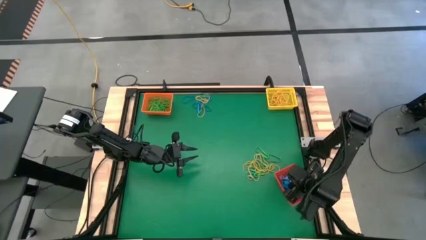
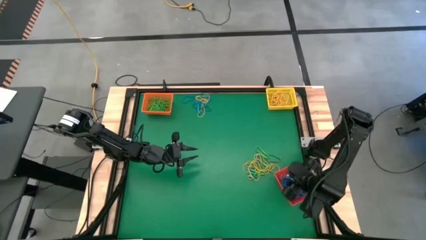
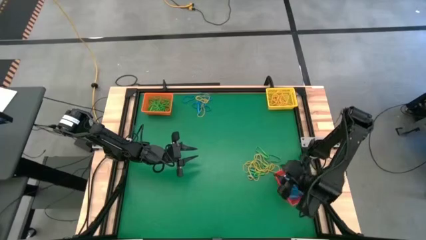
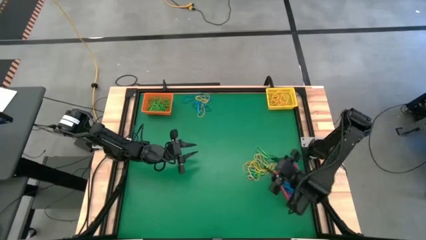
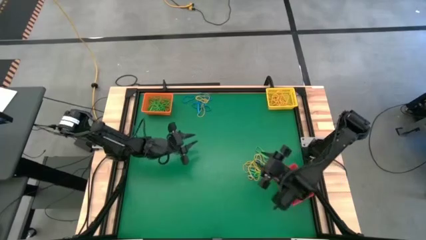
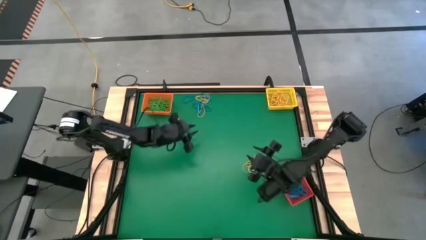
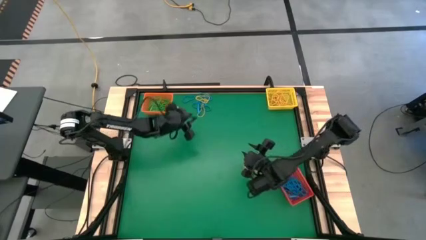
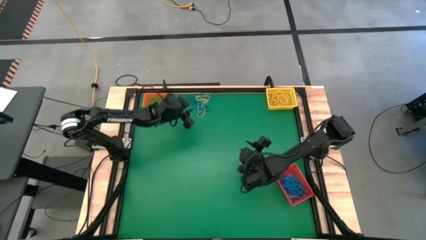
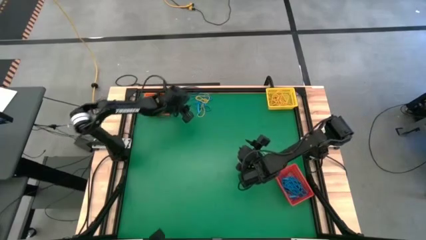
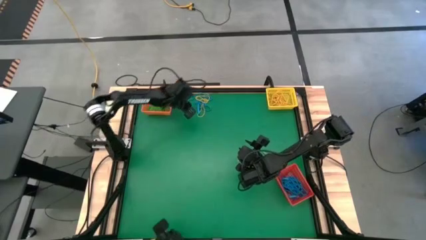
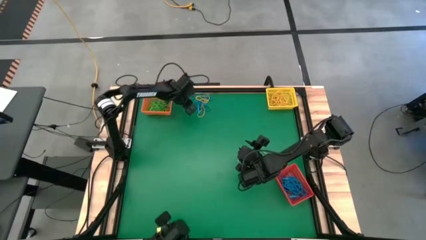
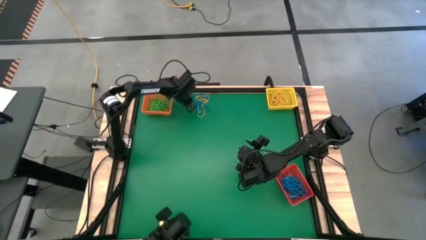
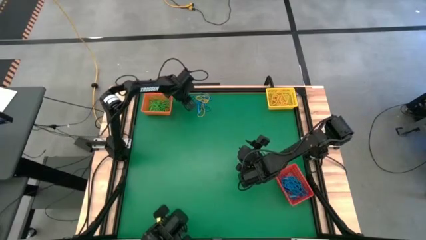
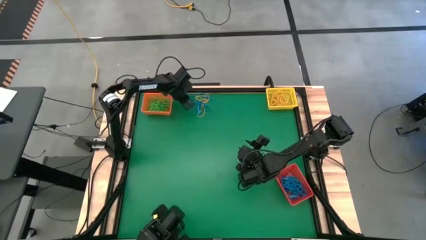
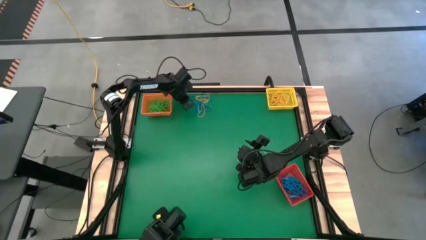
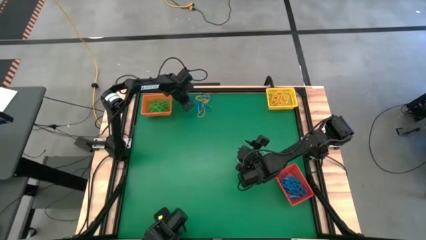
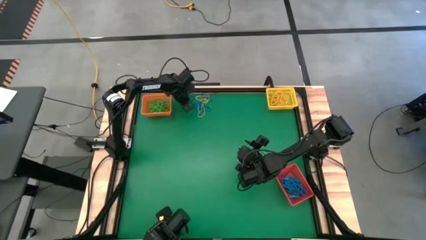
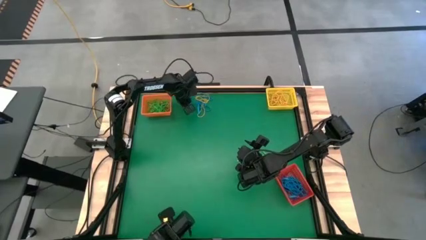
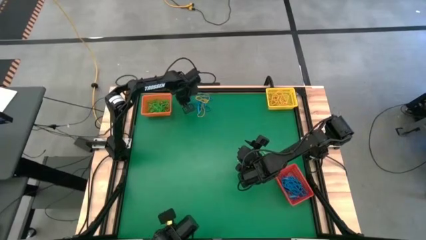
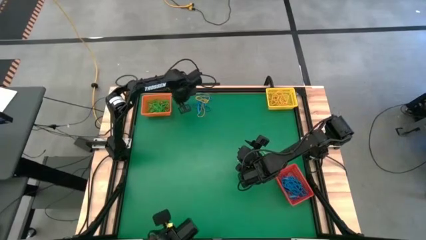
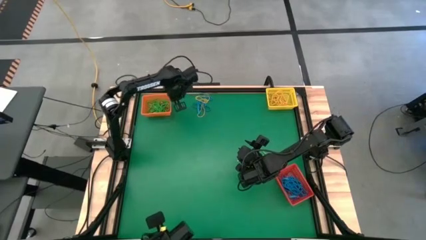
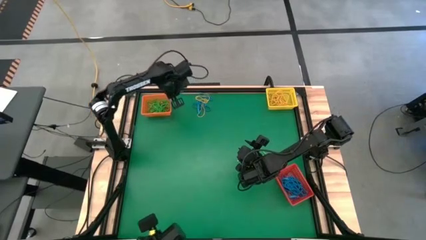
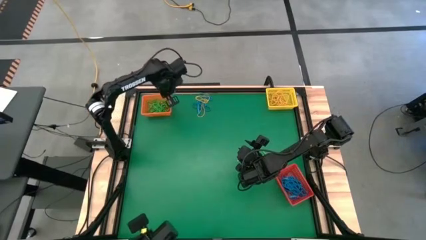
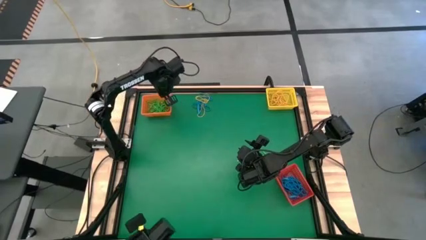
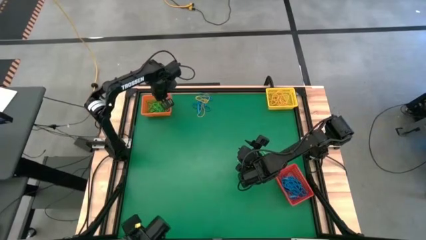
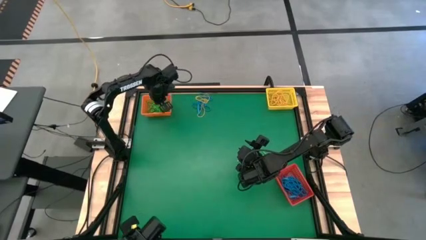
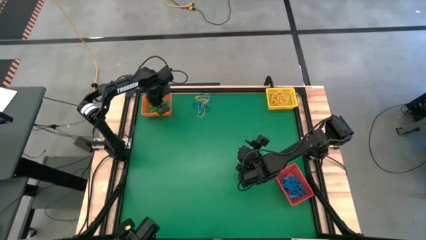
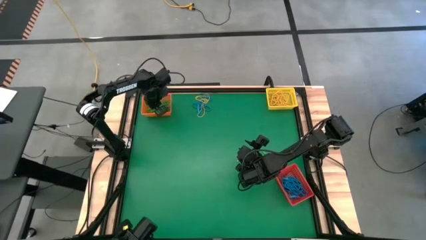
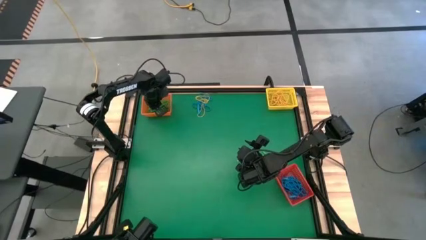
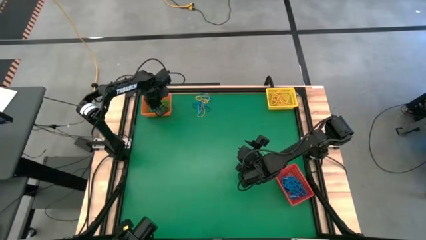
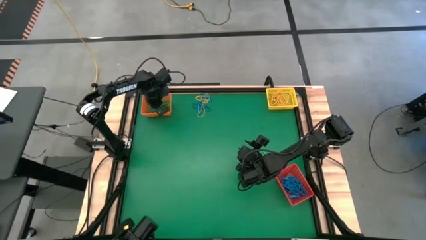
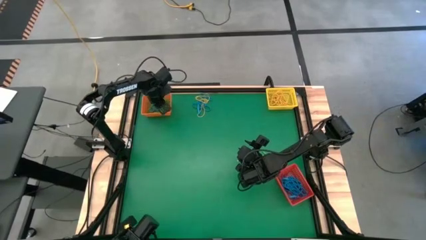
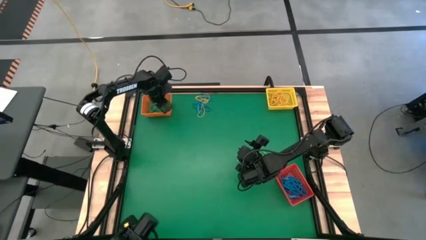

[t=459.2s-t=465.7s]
Task: Sort rubber bands into baskets
Put the blue rubber band into the red bin

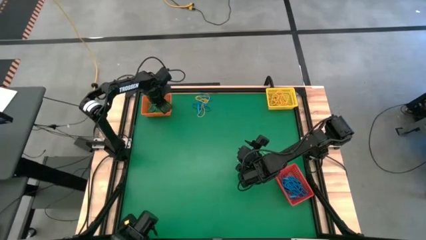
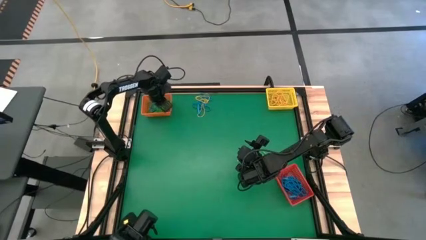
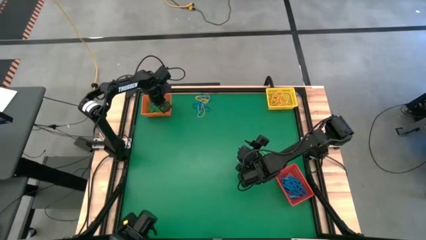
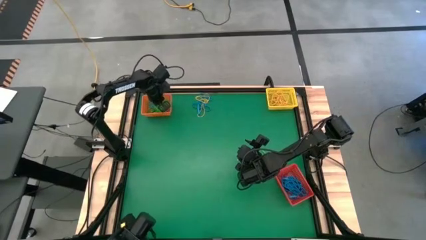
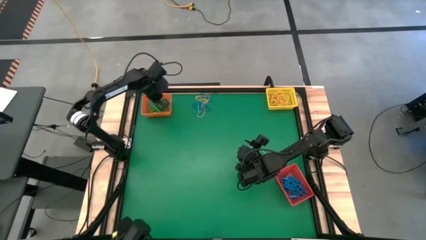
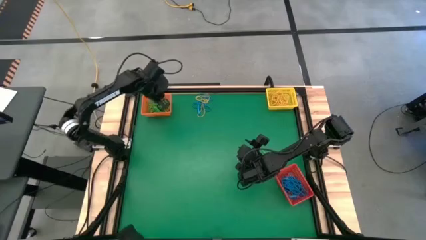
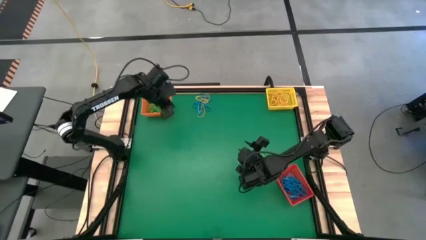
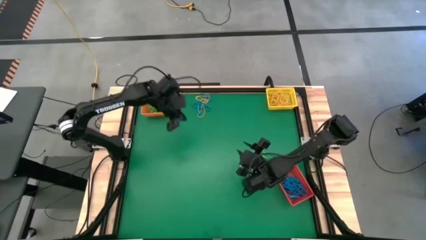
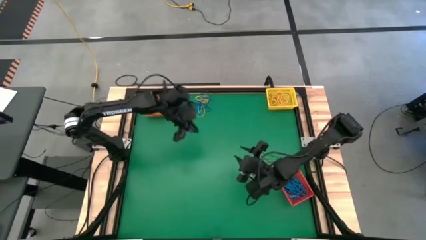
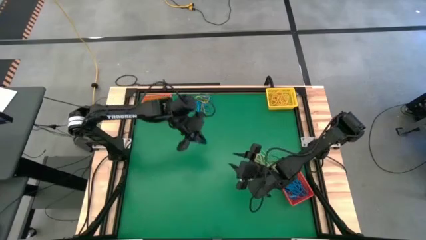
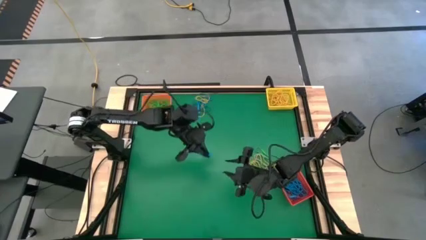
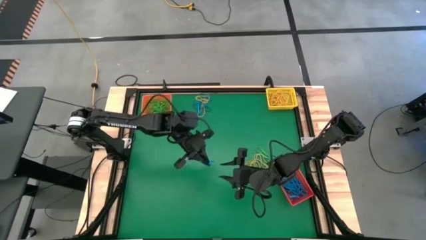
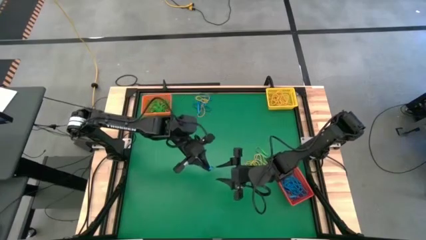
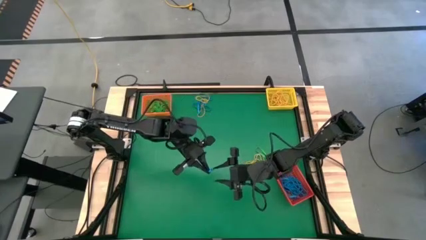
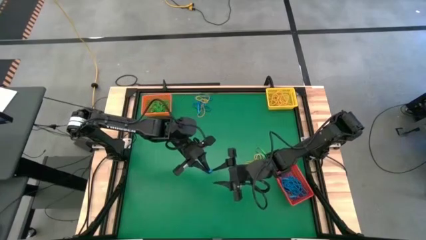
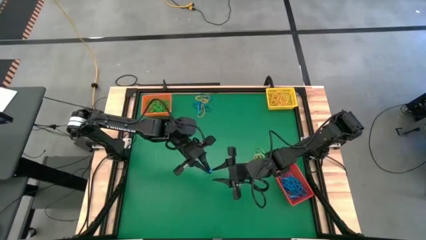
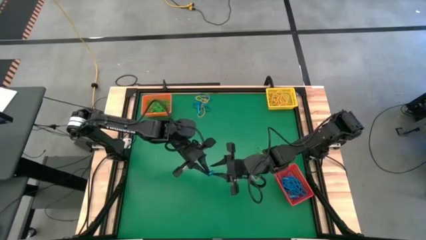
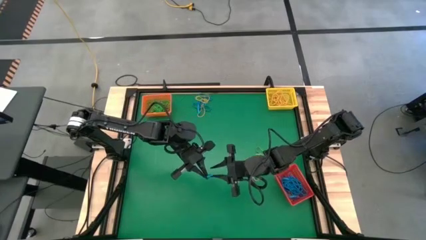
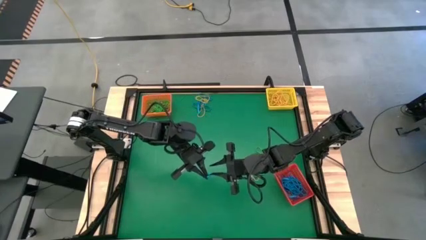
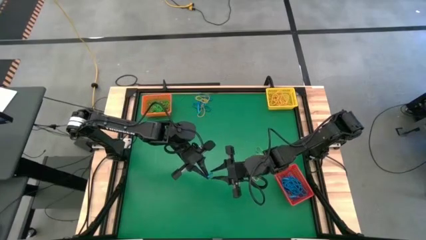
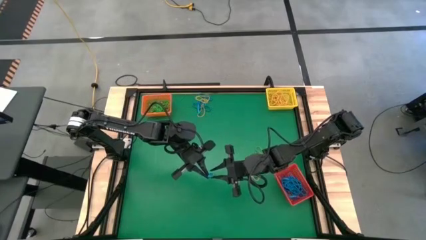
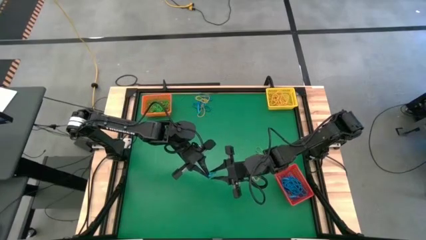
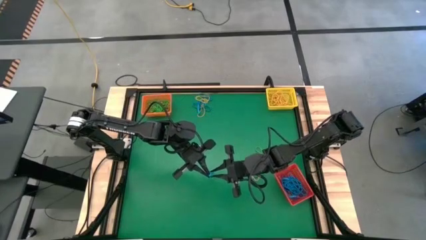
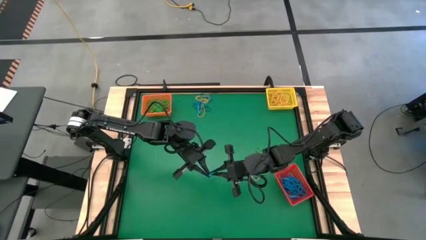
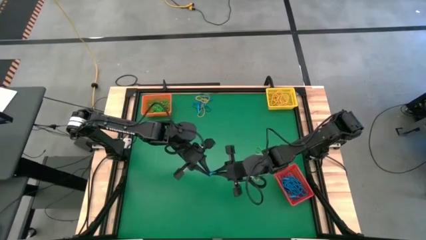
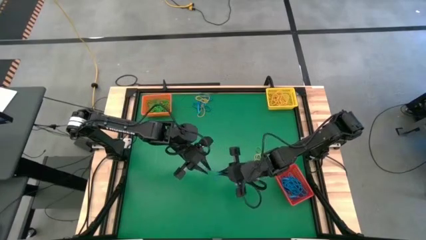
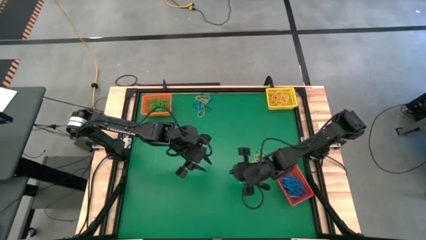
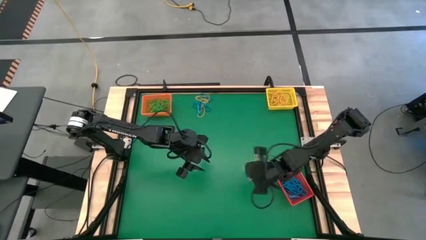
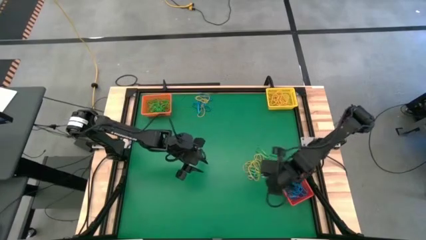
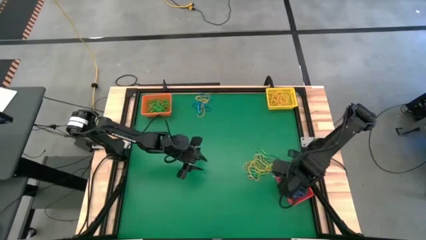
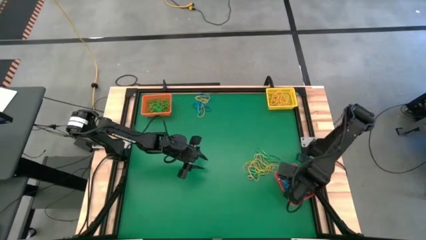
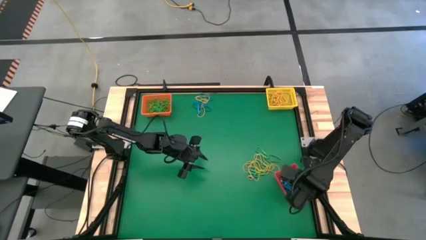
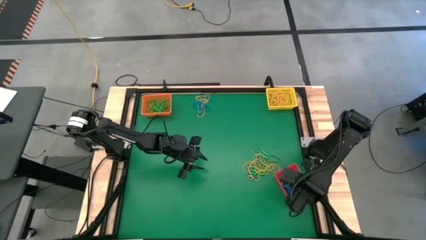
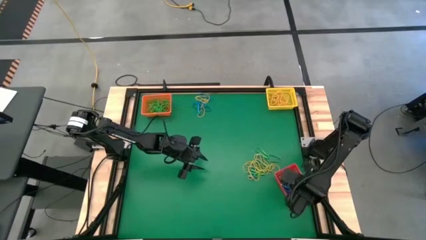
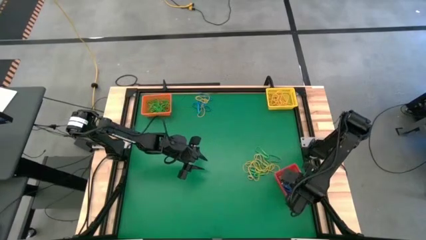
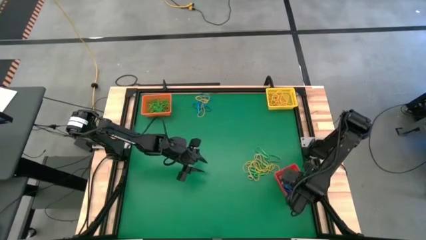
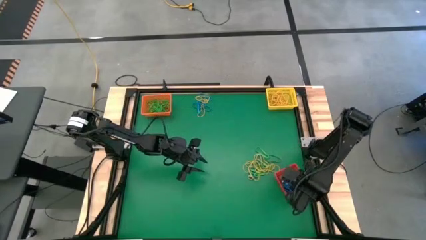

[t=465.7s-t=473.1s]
Put the blue rubber band into the red bin

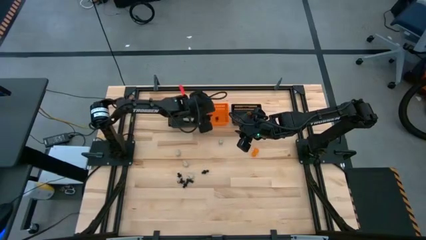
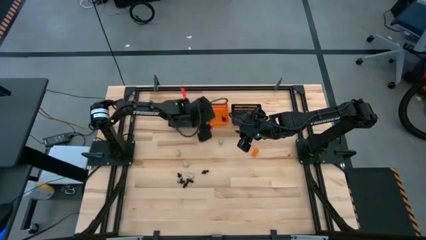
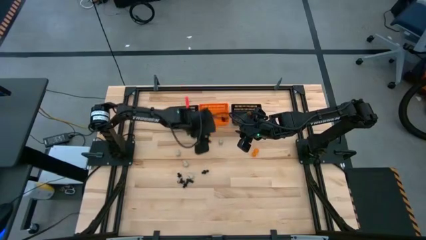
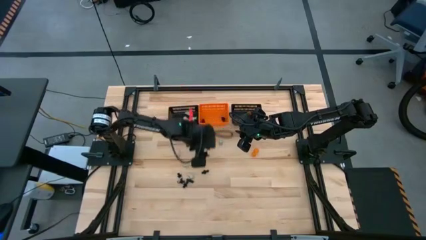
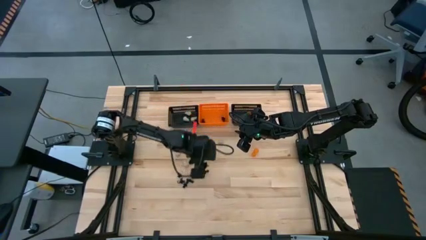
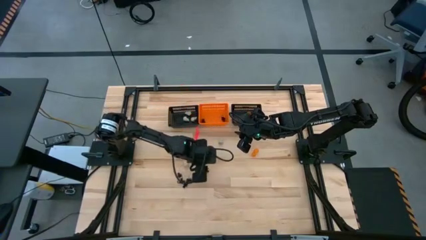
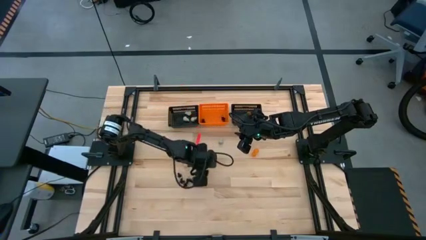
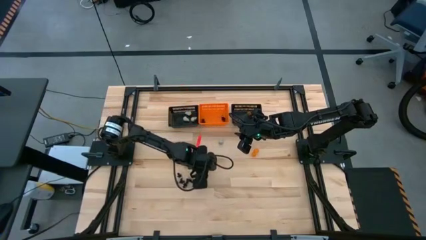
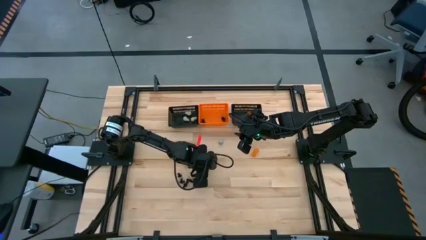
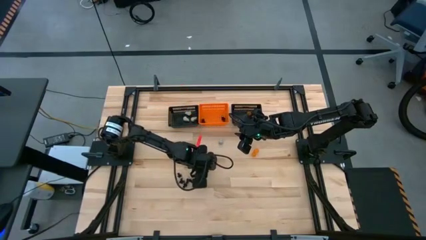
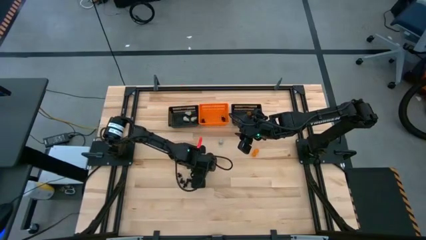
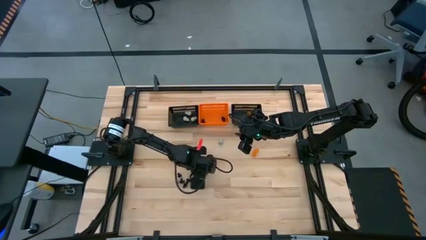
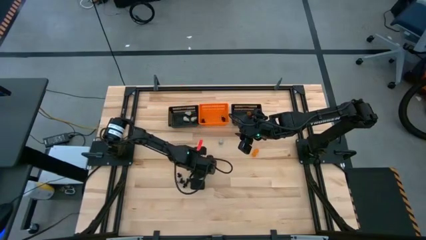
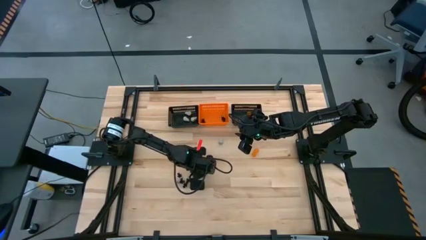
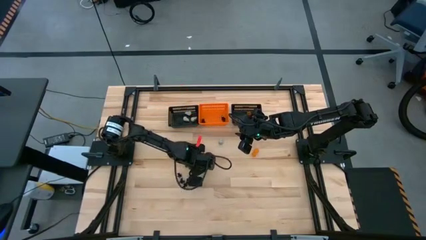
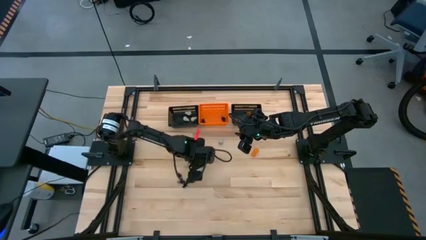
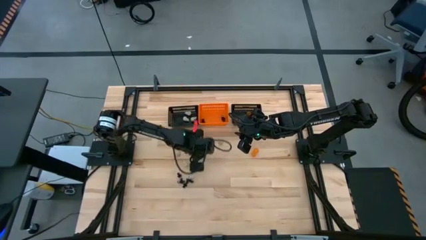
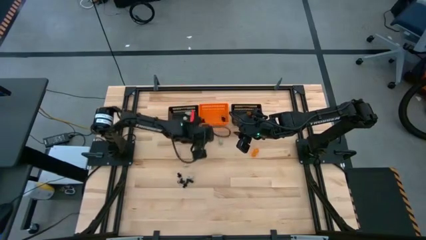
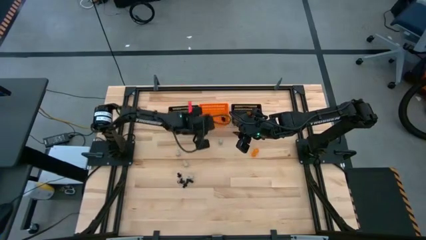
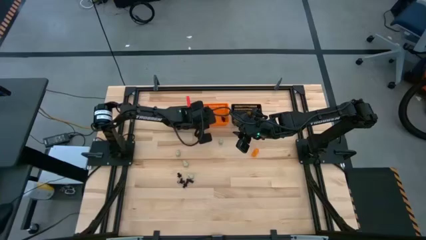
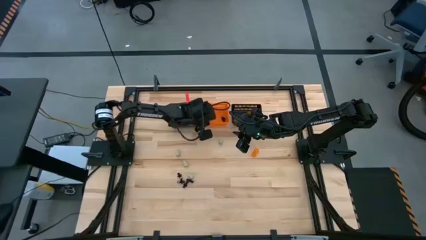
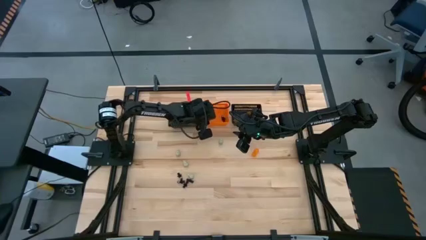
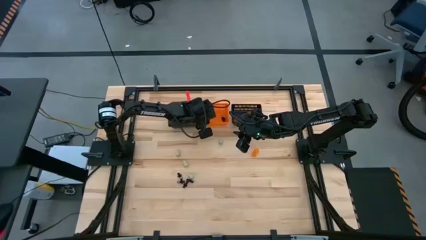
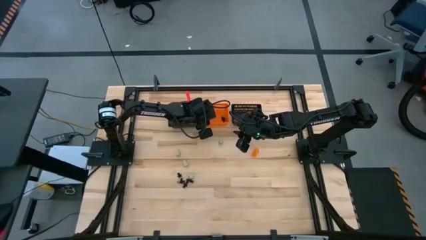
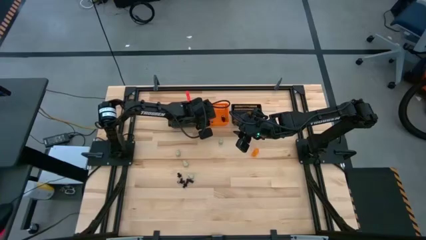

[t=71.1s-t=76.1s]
Task: Sort Halloween decoration
Put the black skeleton toy into the orange bin
